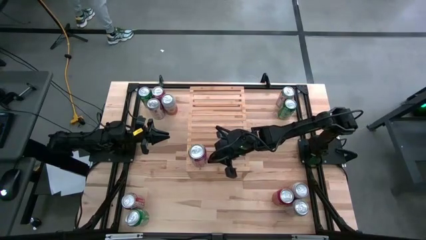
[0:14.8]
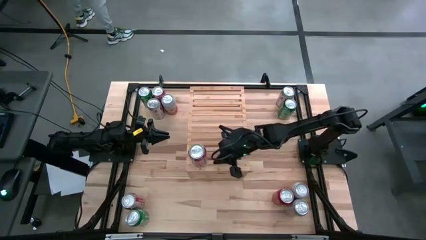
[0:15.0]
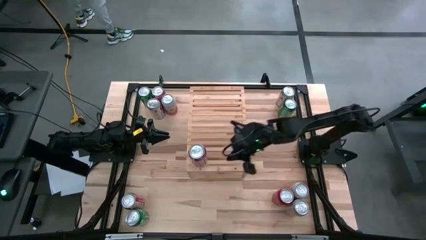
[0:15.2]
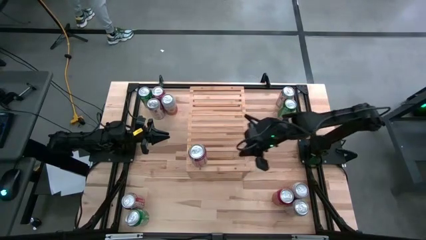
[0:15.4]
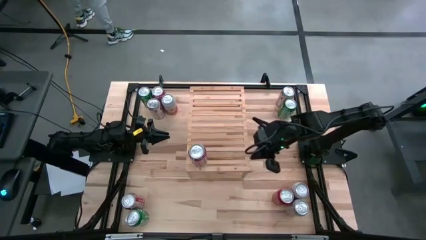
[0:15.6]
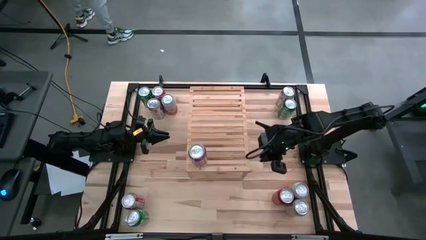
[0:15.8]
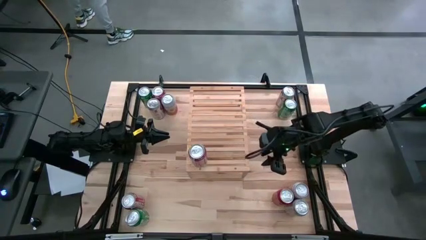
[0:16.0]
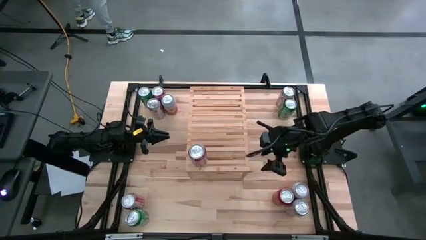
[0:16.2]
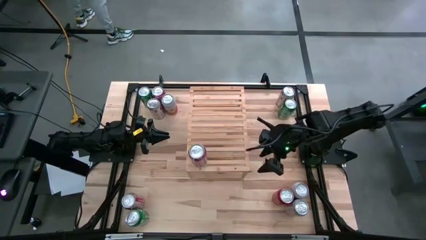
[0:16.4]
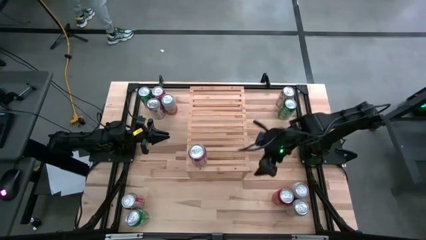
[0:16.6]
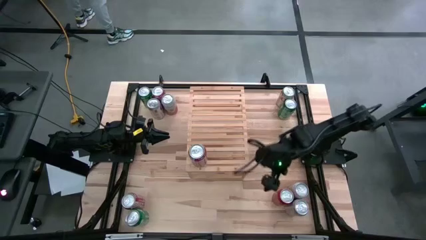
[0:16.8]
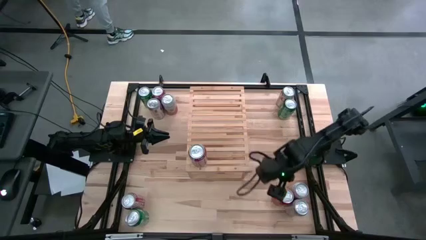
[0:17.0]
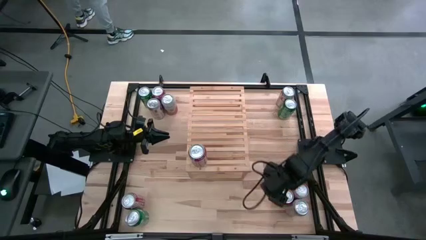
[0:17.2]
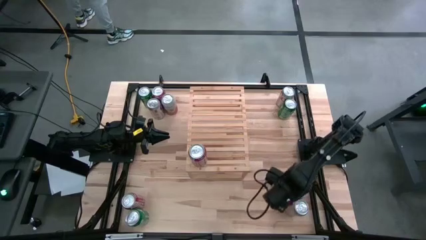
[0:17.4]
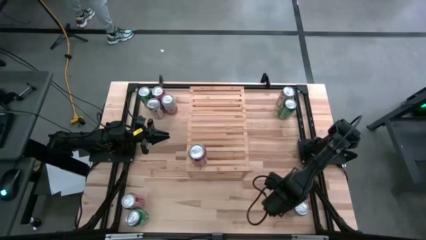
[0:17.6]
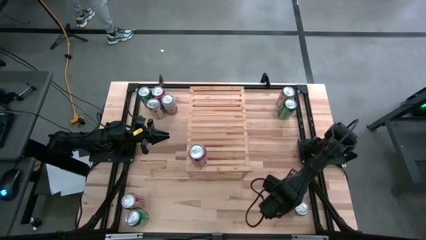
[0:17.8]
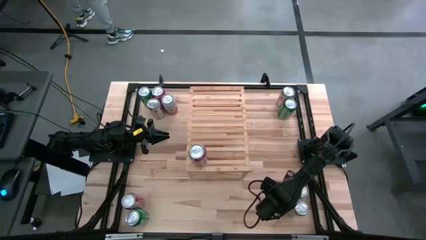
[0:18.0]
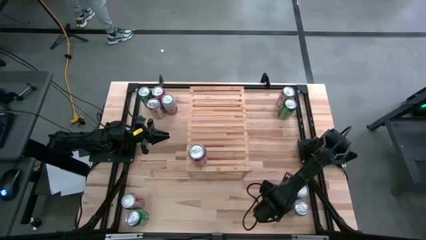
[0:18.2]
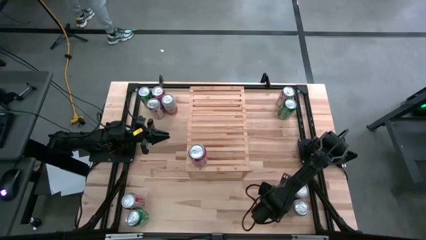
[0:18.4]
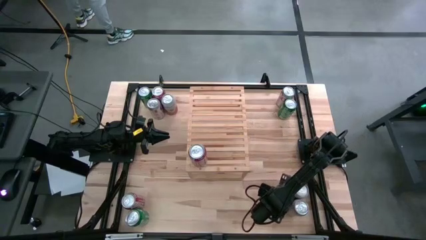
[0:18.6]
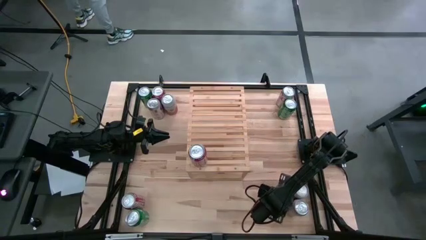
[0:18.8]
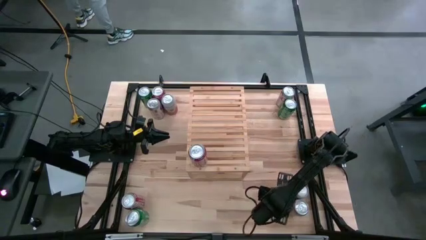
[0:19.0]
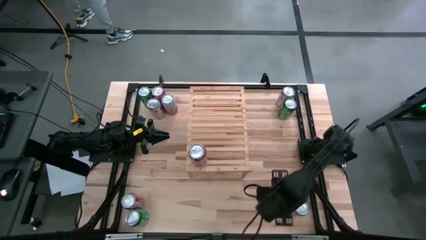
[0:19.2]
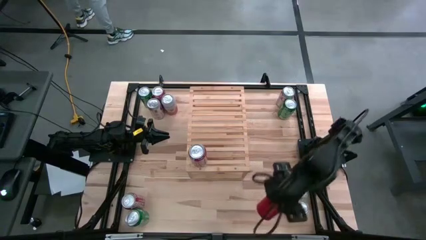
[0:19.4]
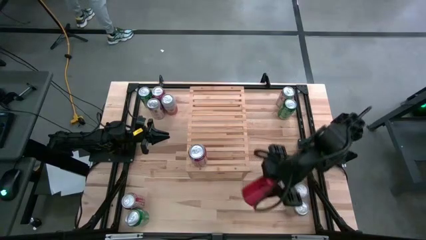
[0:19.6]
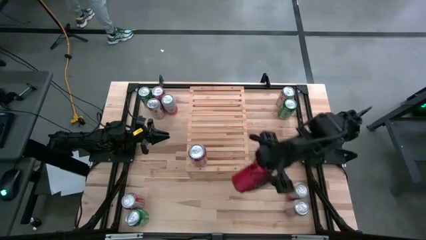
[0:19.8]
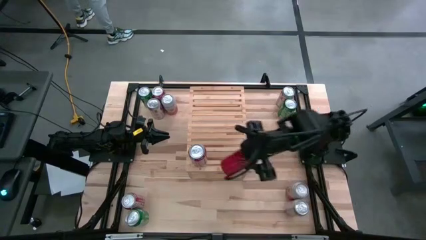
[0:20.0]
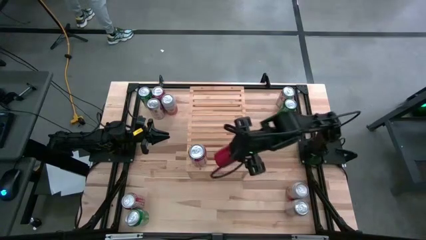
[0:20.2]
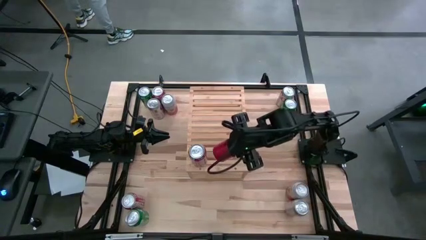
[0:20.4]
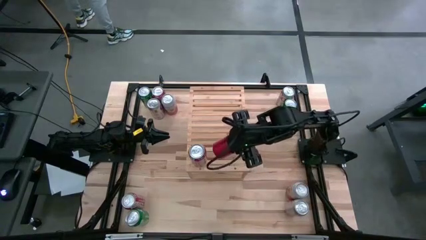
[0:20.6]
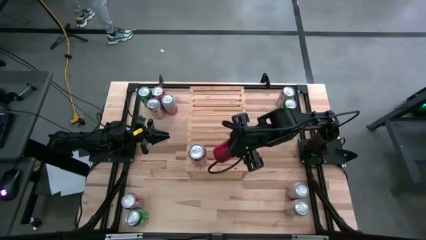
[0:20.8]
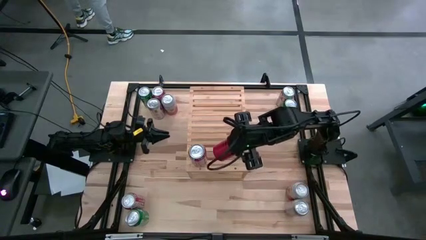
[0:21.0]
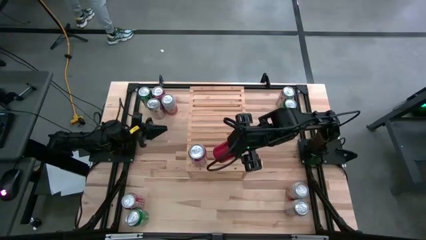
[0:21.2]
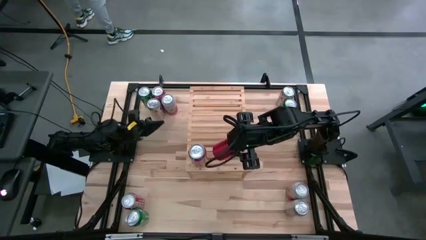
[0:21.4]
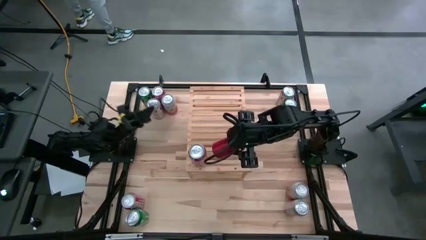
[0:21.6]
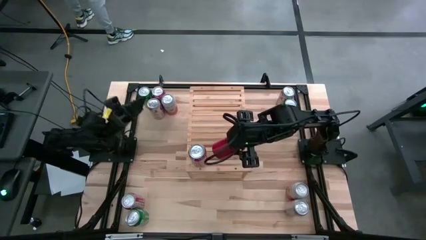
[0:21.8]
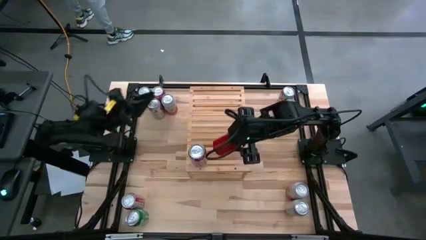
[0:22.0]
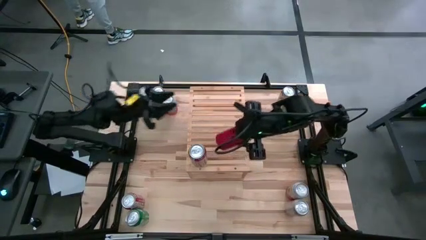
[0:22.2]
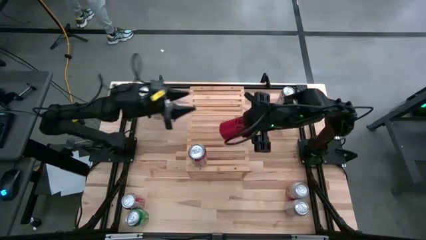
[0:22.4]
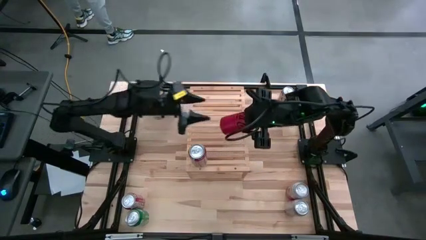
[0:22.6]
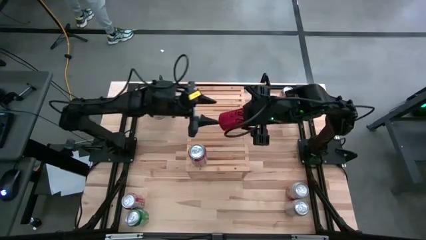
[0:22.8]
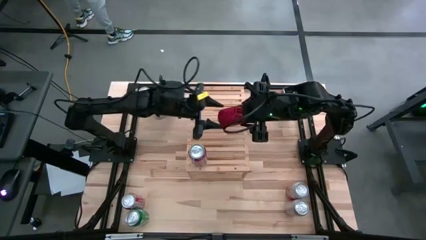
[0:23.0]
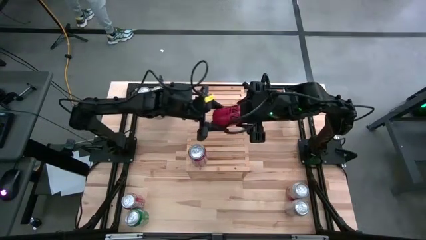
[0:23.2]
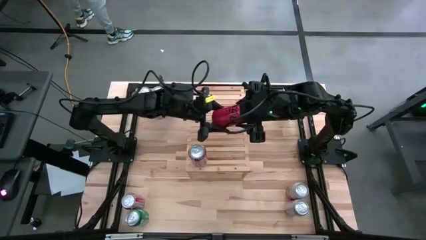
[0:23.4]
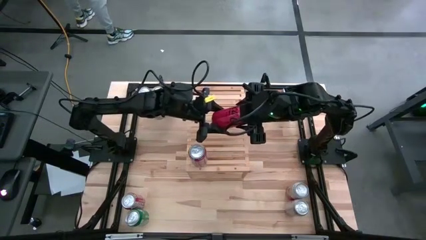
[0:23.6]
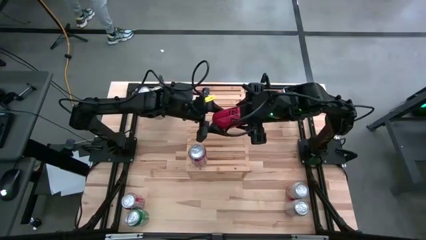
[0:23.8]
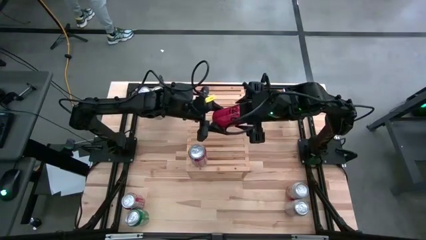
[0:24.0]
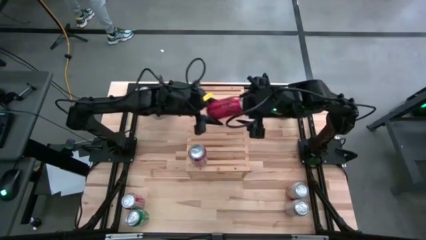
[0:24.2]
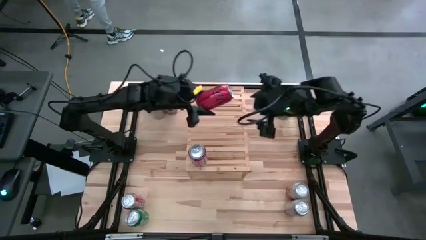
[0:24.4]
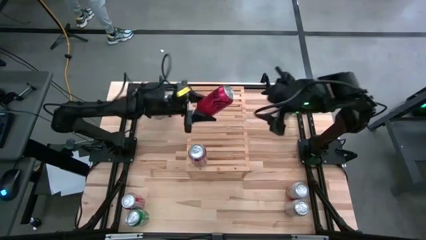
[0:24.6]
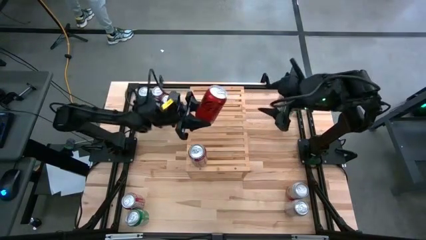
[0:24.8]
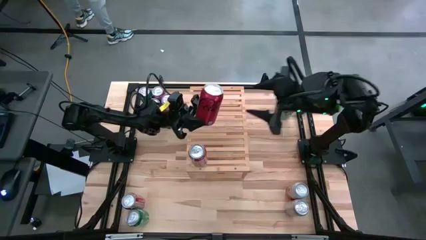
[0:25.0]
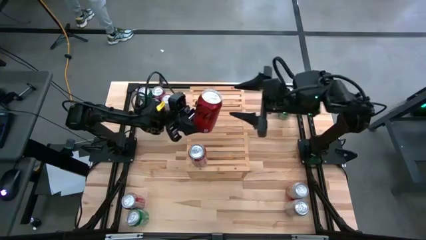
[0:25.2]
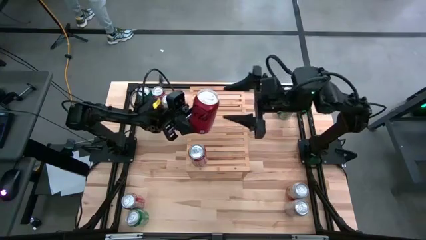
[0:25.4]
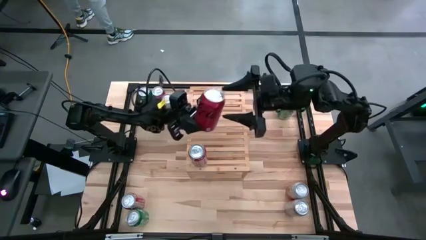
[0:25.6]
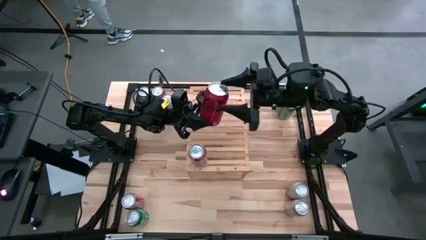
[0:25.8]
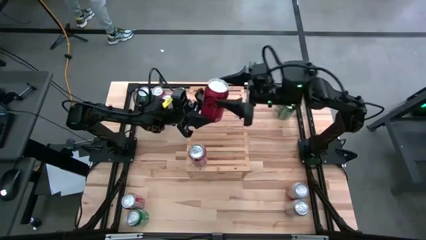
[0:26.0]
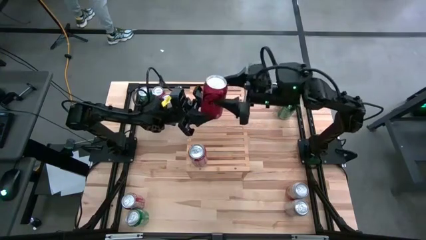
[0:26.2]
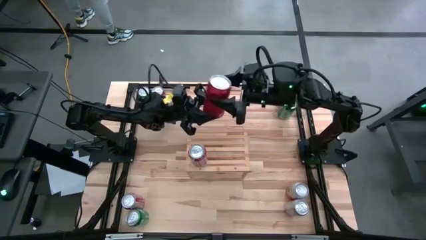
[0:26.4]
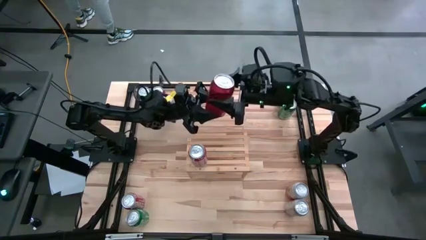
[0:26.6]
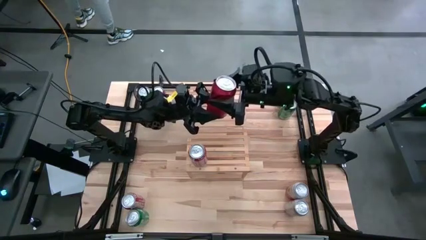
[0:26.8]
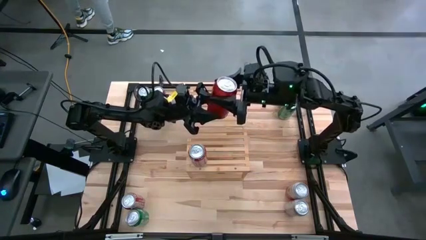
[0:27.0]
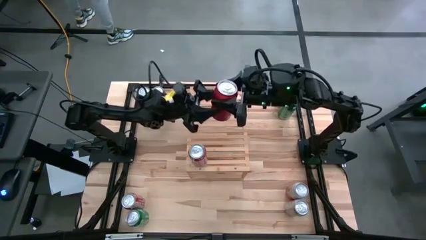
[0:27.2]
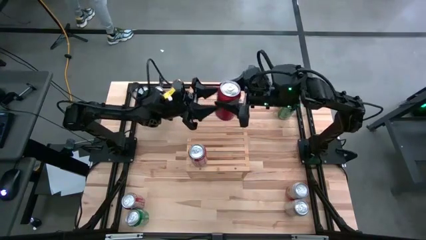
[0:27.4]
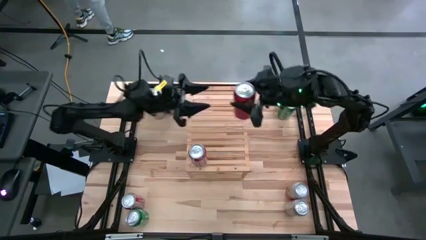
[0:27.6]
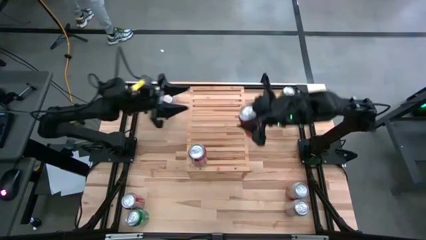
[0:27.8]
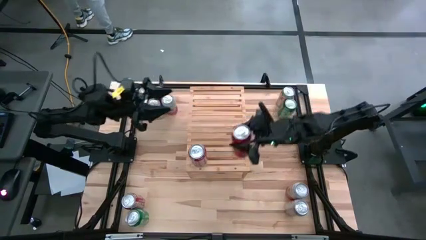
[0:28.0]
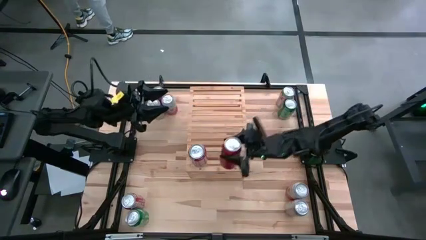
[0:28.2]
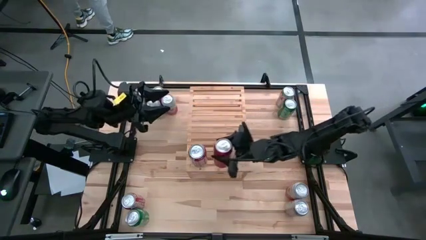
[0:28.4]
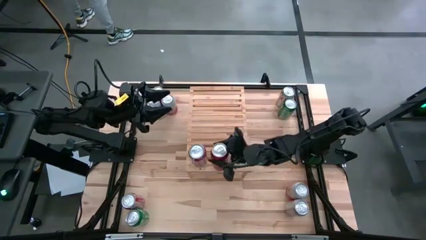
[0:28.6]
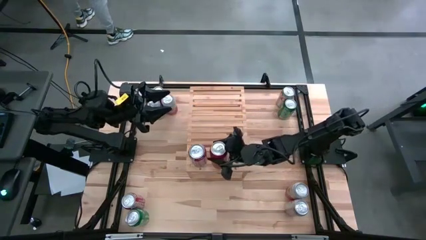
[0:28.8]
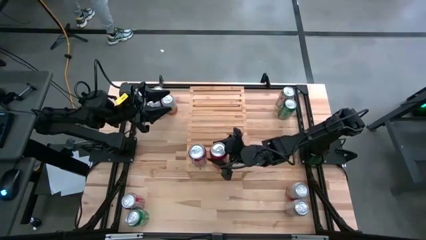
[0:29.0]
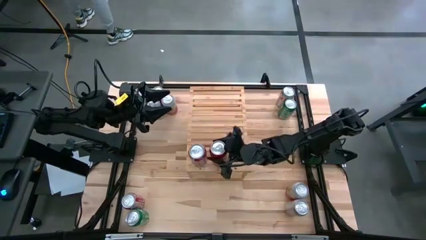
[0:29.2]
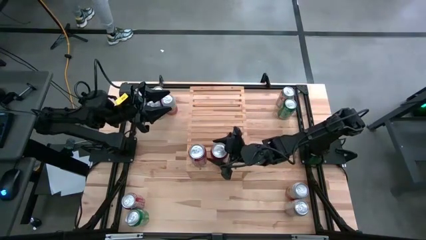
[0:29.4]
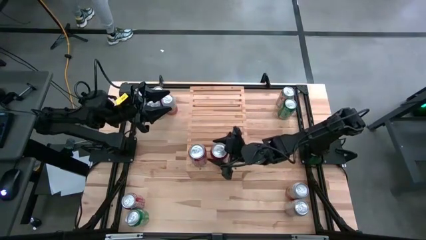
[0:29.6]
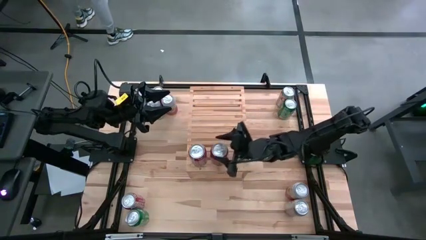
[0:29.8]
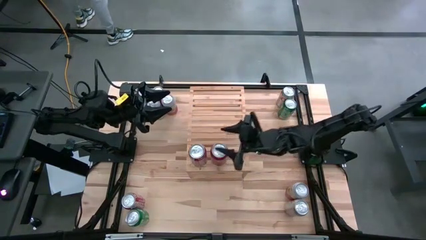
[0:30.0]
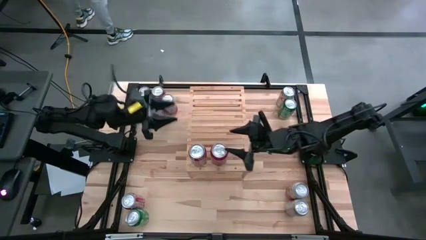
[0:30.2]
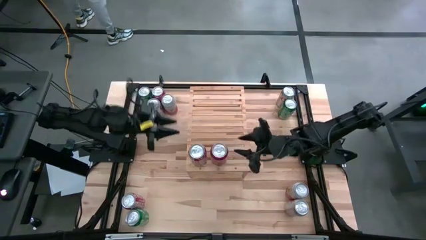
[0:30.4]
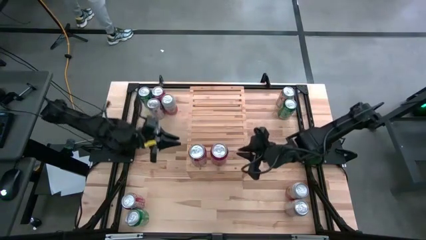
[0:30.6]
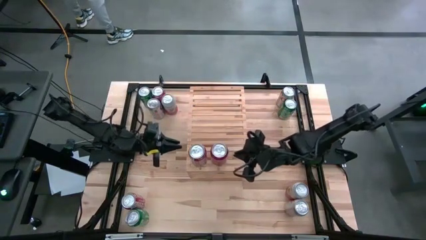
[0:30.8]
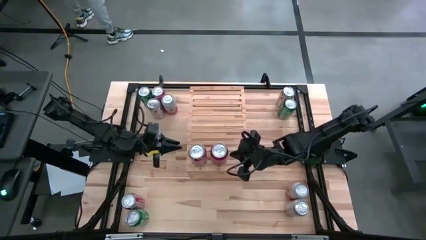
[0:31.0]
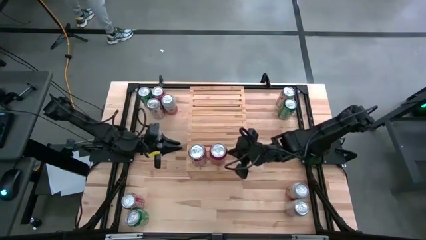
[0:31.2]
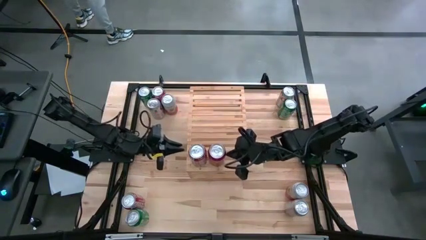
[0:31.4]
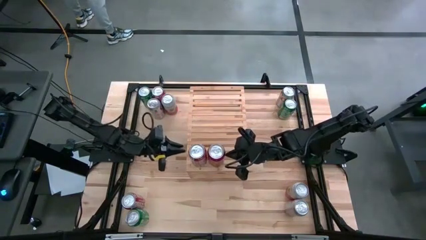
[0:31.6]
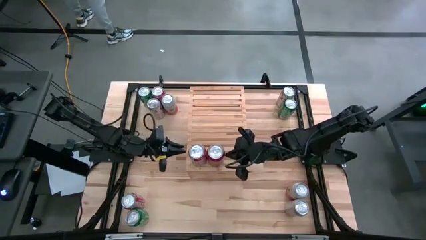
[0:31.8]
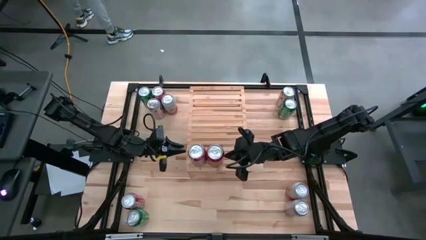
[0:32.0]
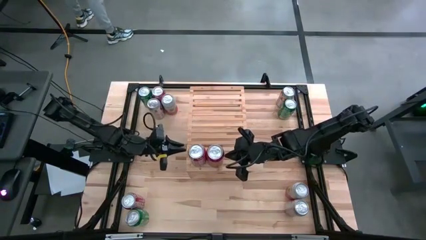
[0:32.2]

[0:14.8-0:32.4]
Task: Place canned beverage on shelf
Put the red-black soda can on the shelf aligned with the other red soda can
